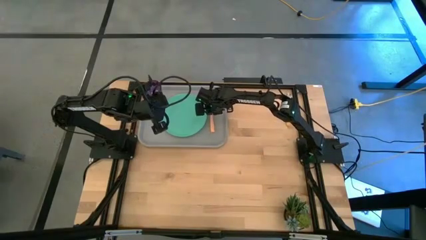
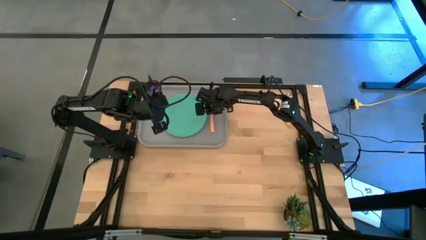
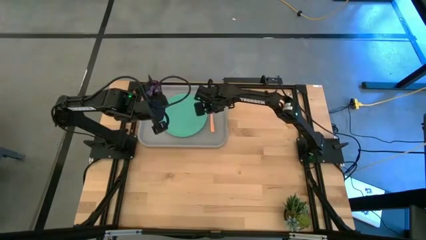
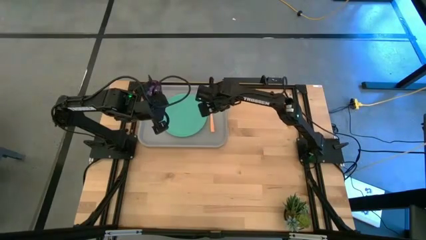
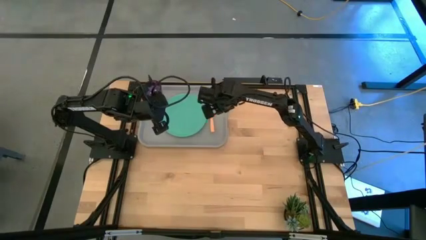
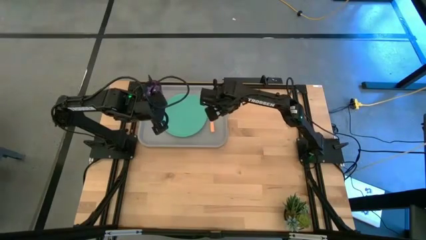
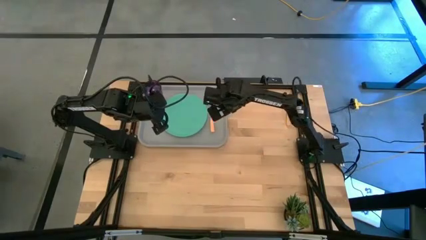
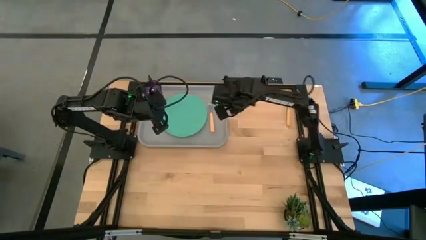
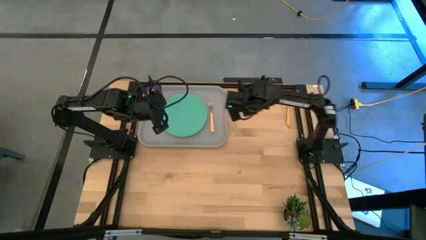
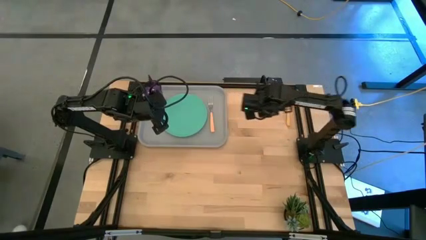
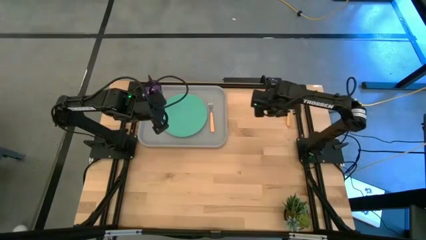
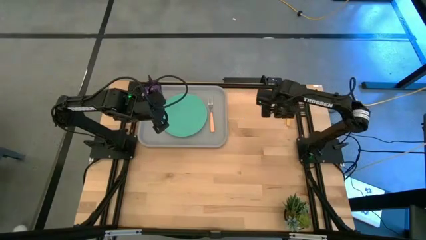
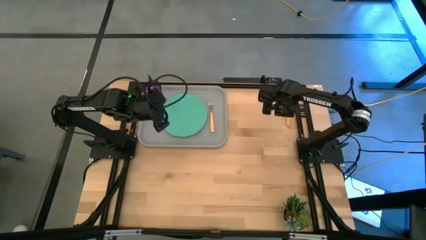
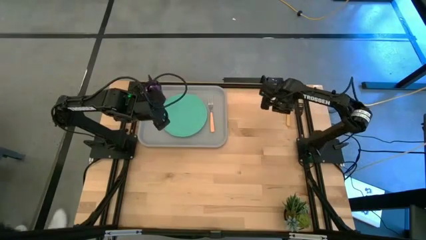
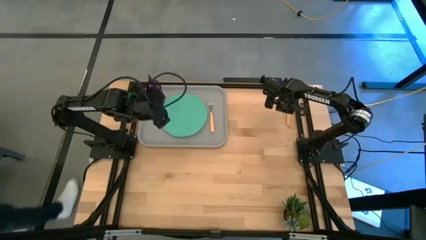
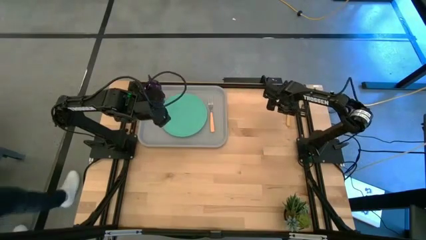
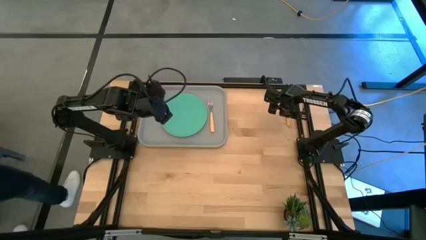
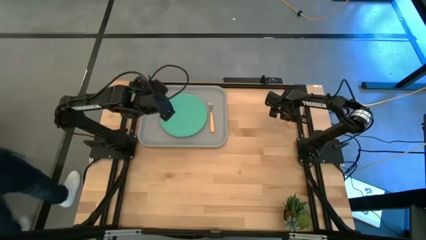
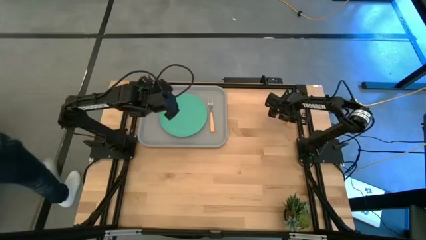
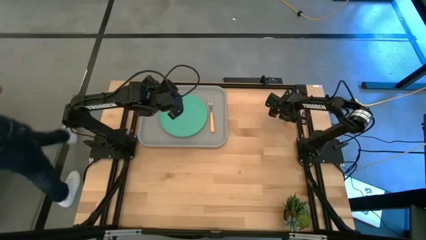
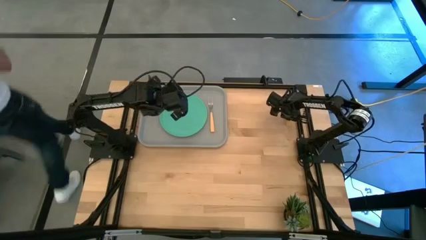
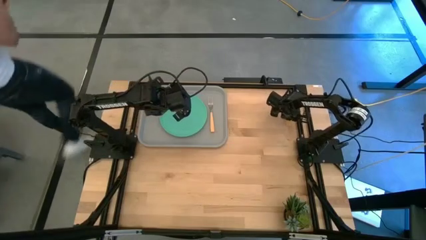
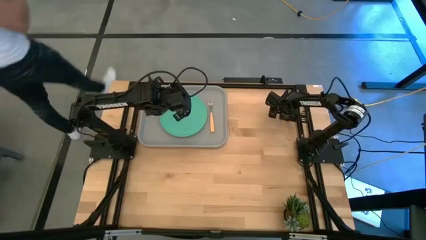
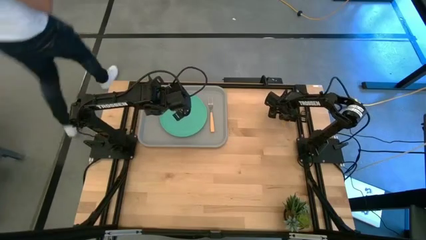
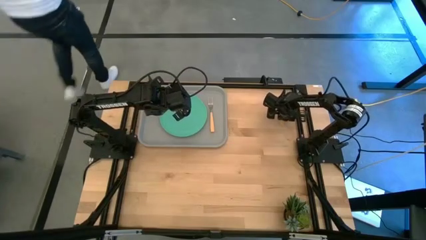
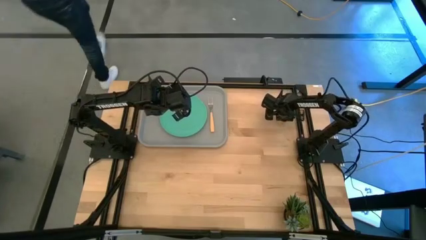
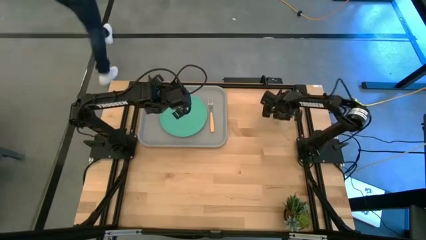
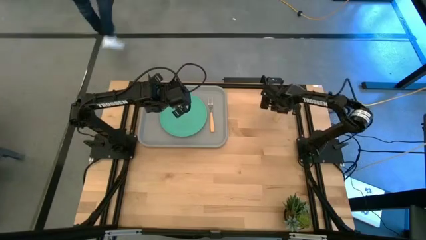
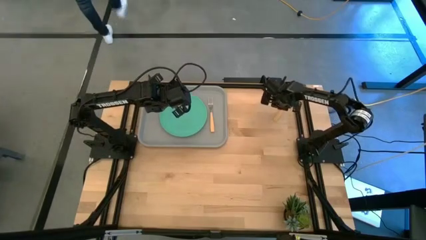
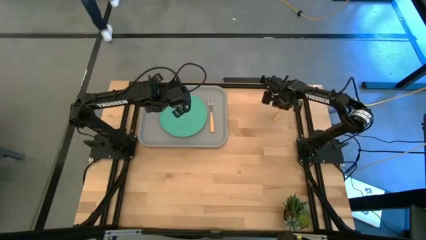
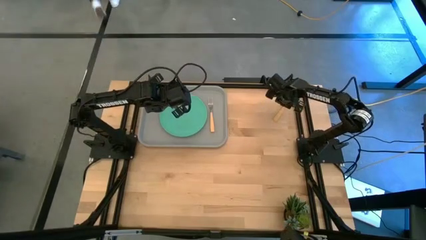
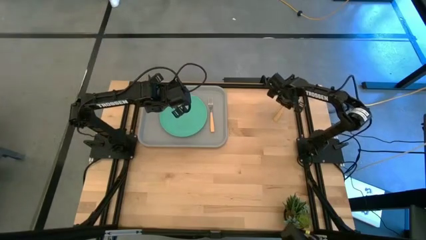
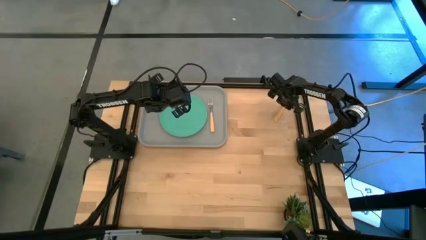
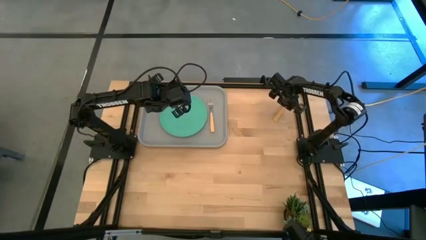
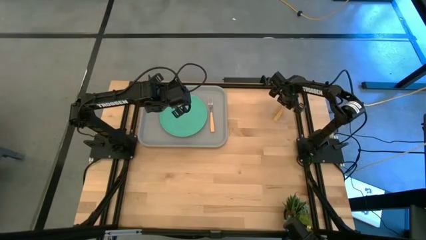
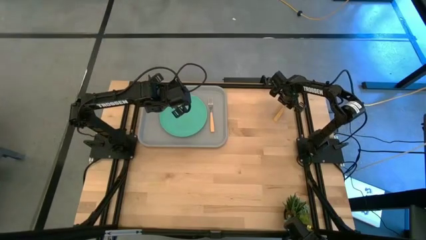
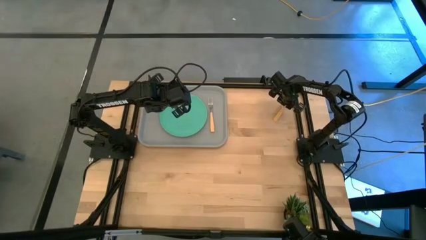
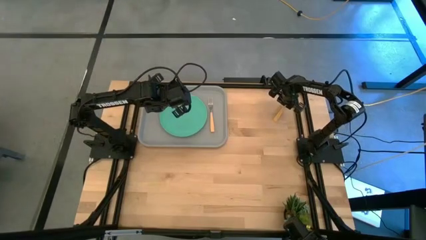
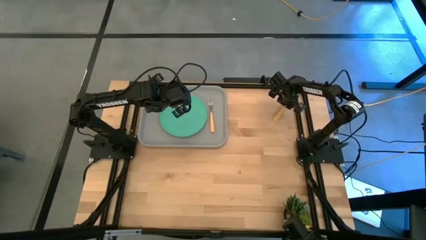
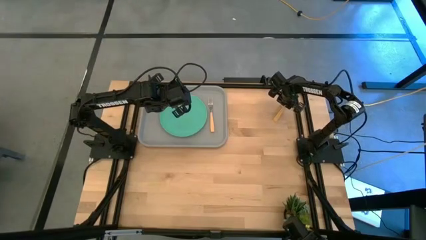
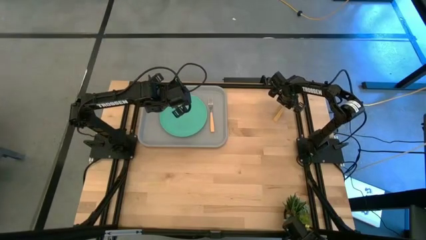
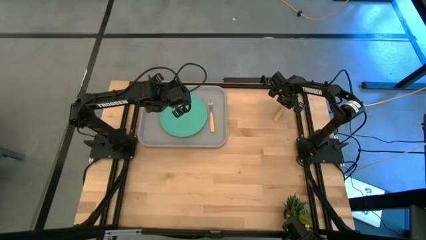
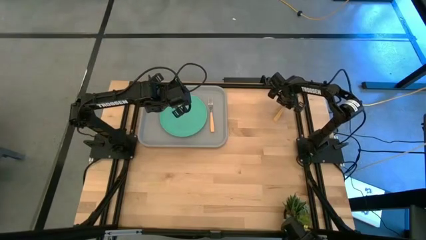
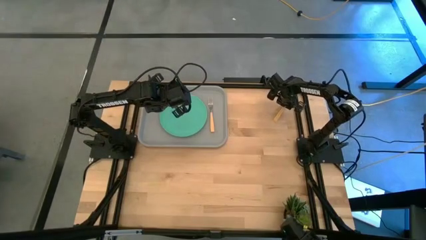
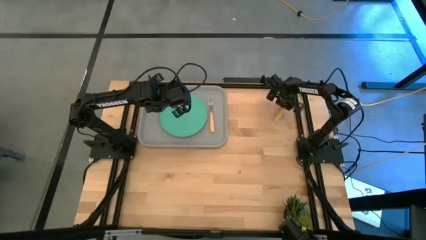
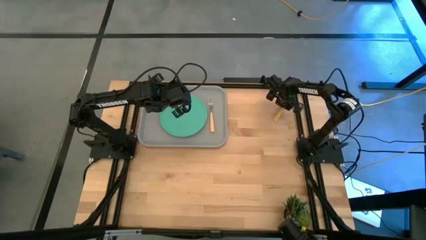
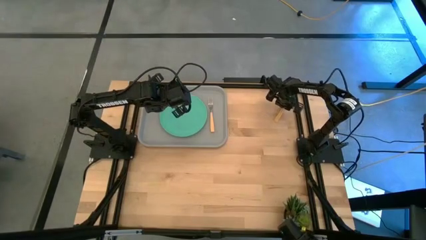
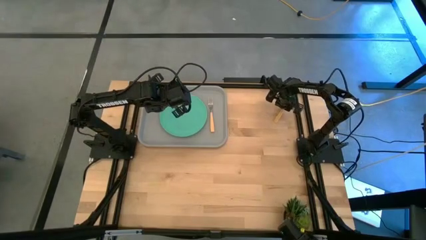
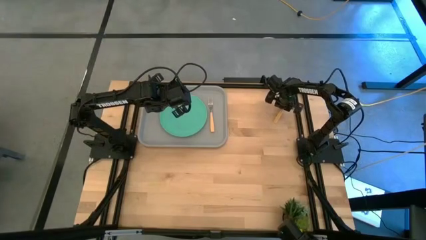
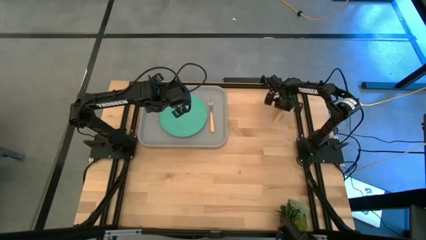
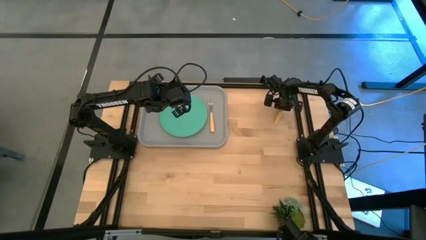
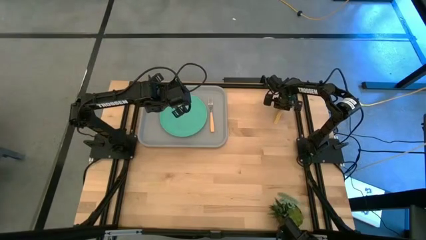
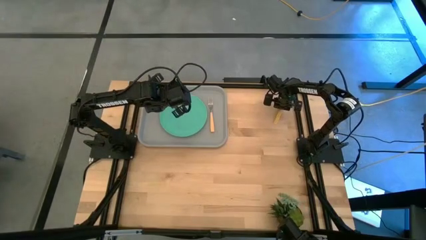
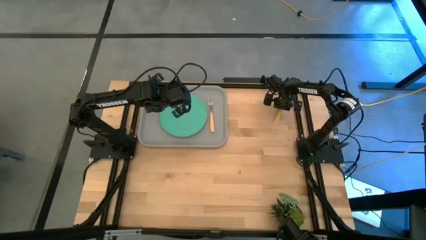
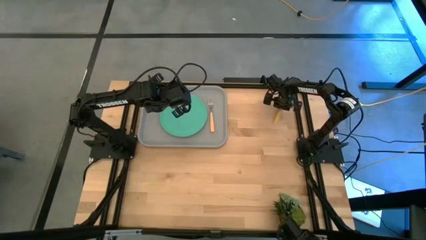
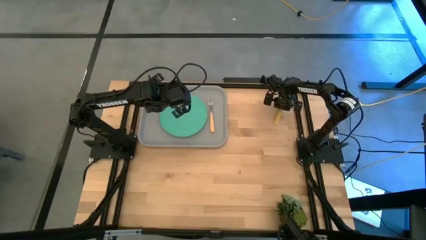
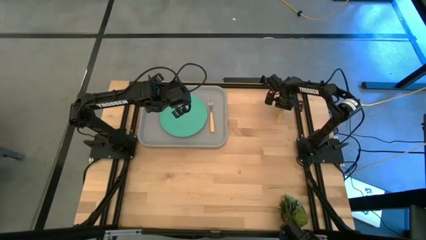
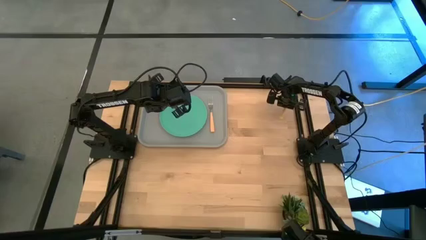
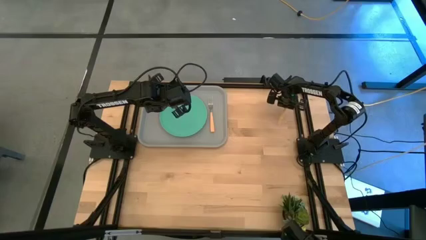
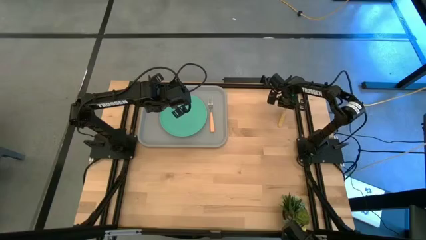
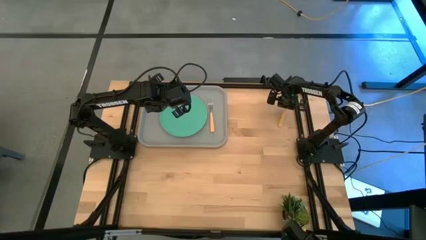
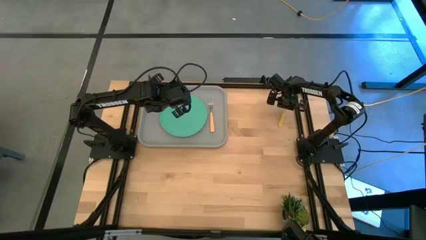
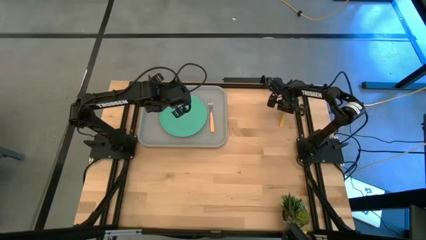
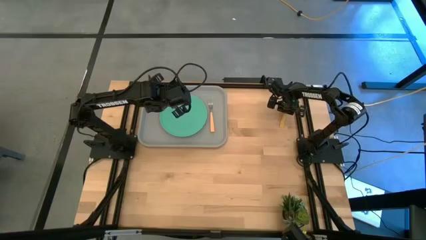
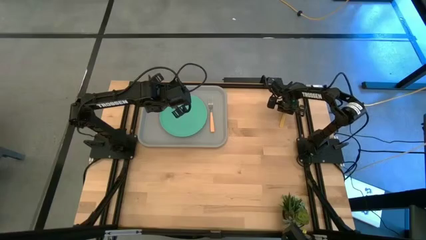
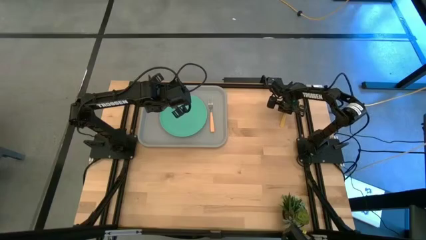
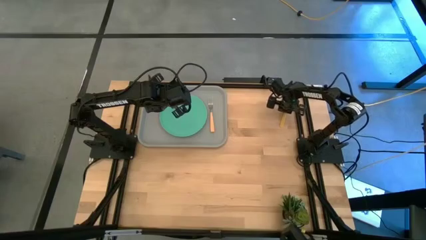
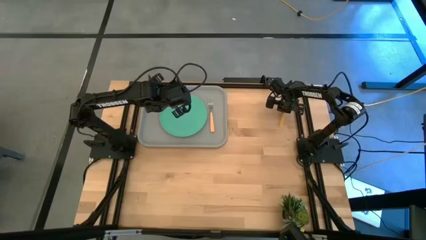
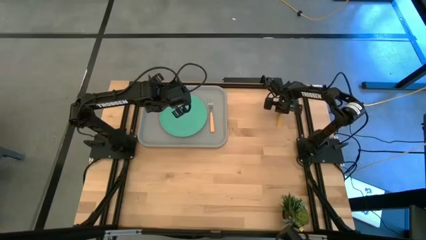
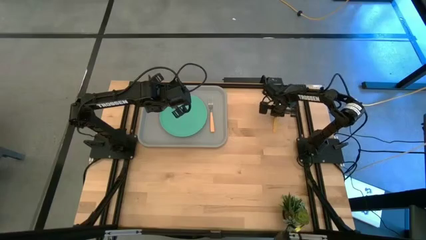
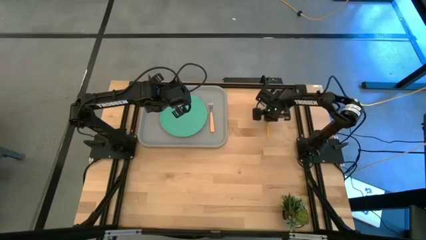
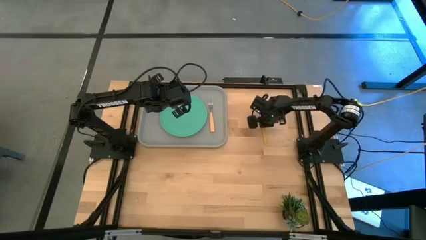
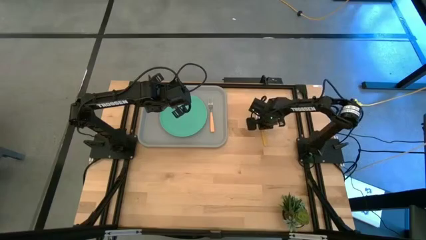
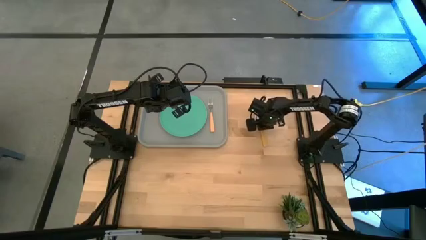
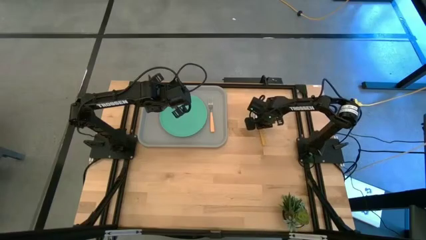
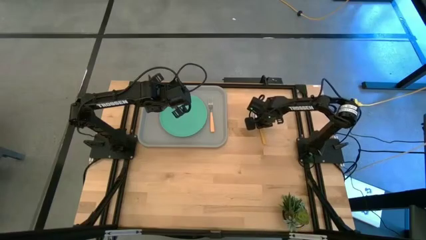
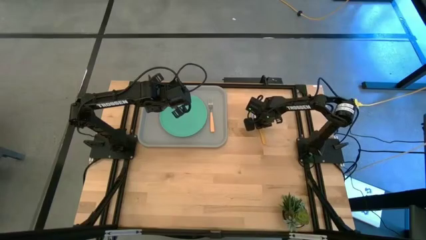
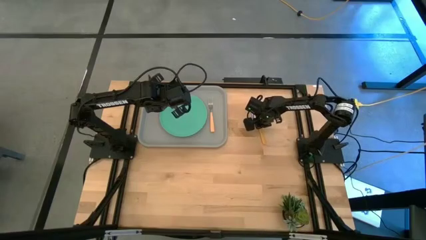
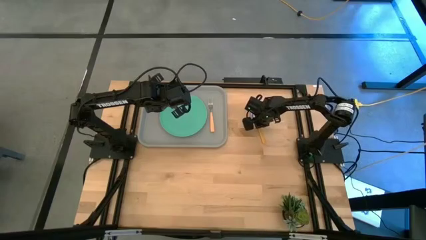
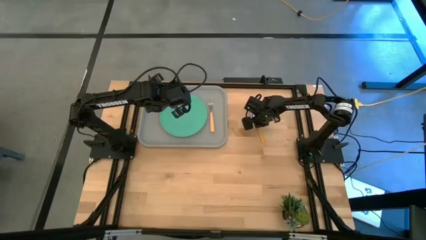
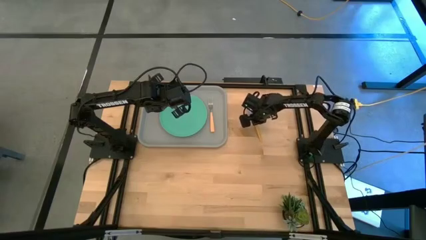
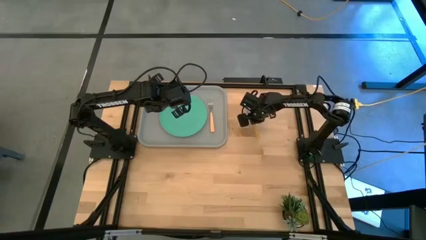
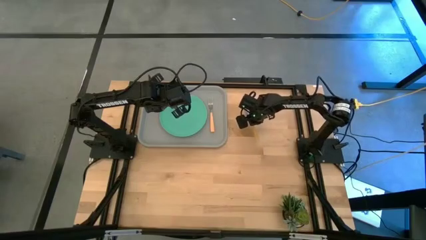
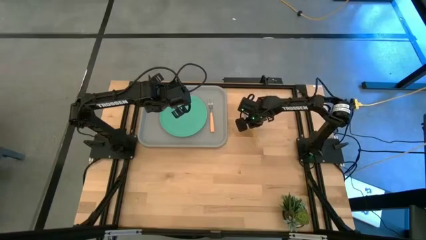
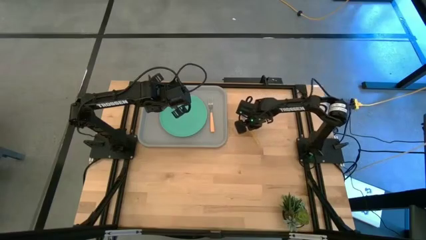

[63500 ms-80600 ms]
Task: Pick and place plate/cup/fork/spoon on tray
Put the orange spoon on the right side of the light orange fork
